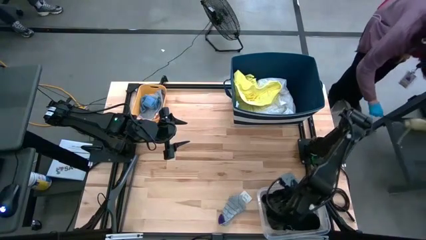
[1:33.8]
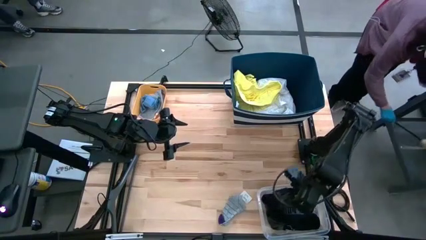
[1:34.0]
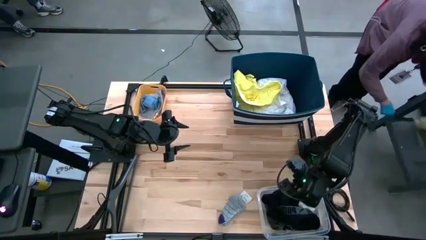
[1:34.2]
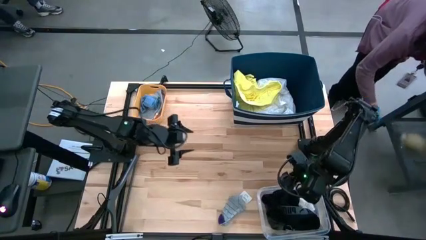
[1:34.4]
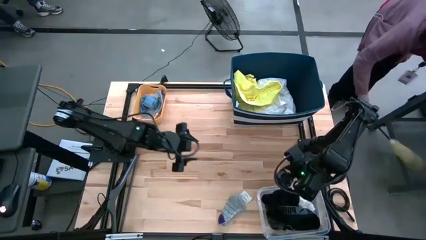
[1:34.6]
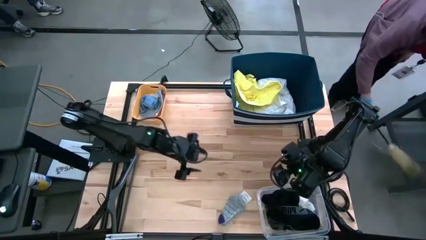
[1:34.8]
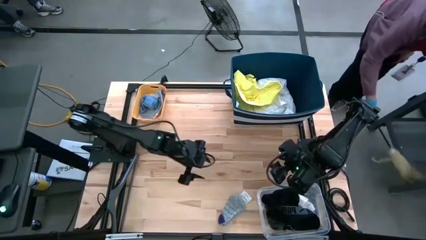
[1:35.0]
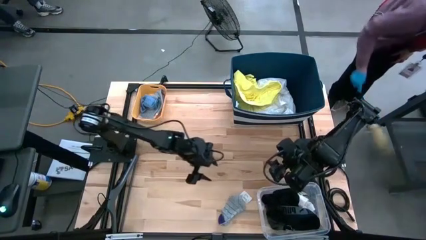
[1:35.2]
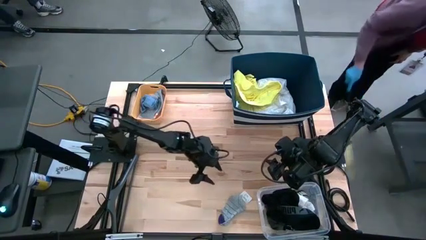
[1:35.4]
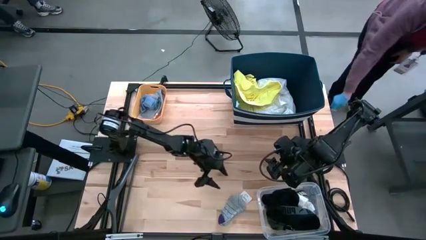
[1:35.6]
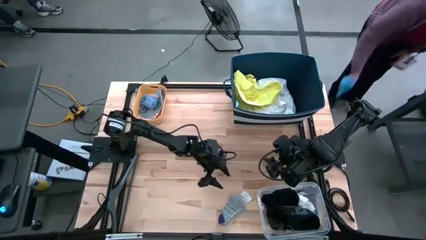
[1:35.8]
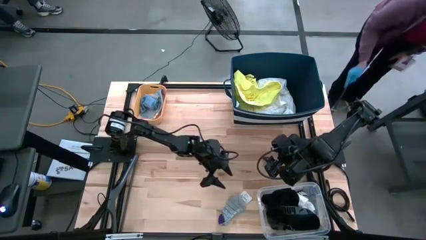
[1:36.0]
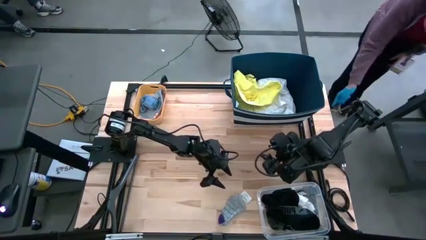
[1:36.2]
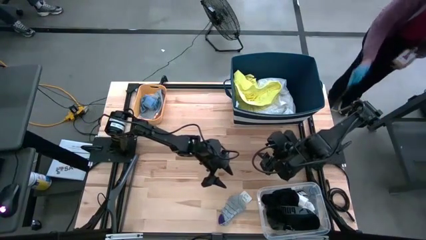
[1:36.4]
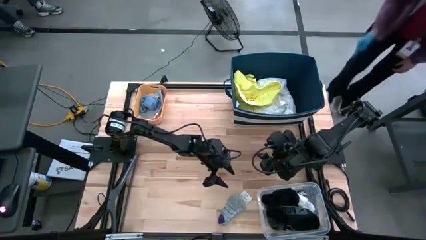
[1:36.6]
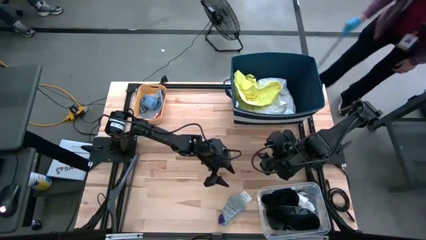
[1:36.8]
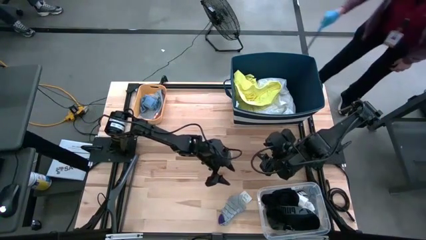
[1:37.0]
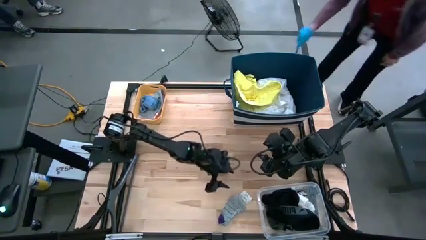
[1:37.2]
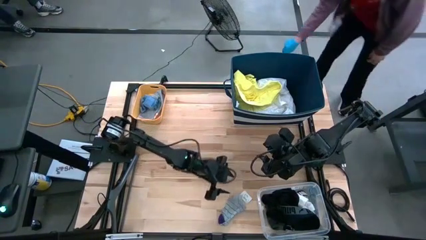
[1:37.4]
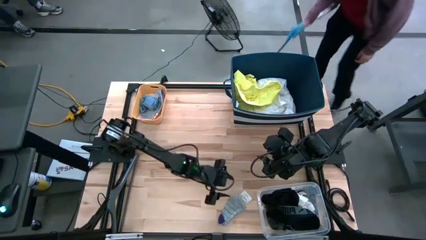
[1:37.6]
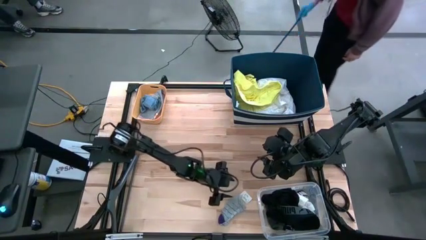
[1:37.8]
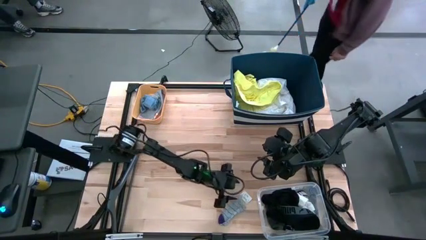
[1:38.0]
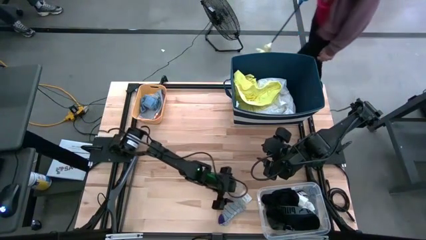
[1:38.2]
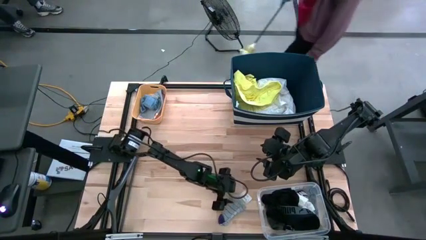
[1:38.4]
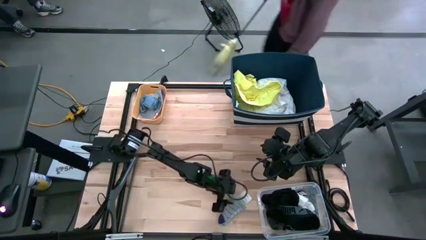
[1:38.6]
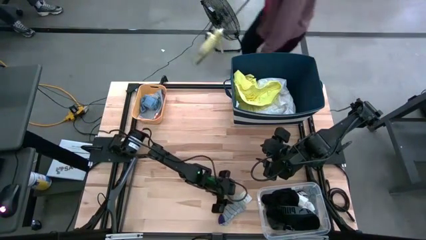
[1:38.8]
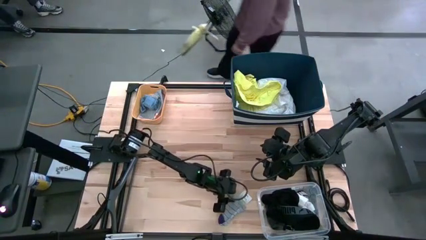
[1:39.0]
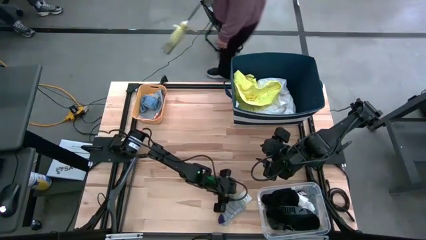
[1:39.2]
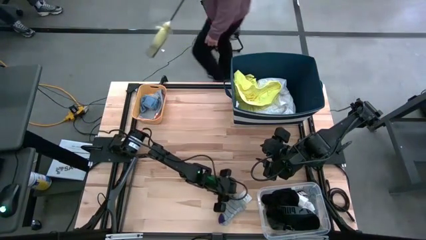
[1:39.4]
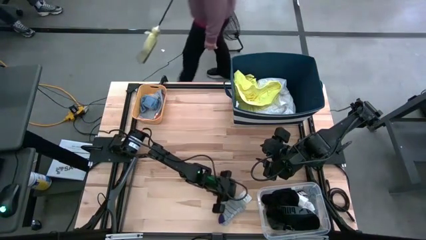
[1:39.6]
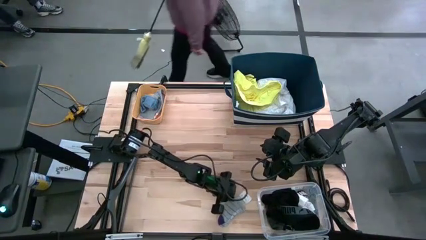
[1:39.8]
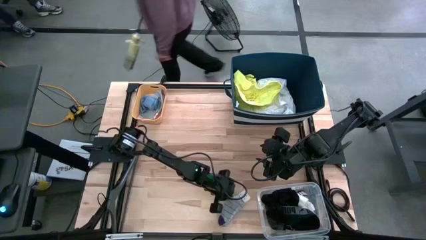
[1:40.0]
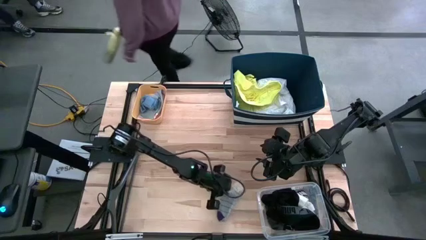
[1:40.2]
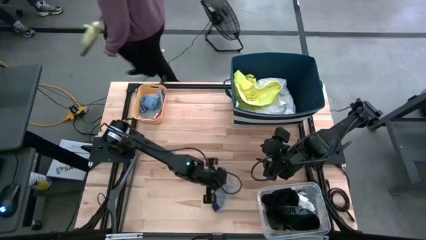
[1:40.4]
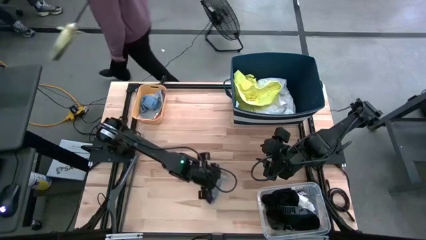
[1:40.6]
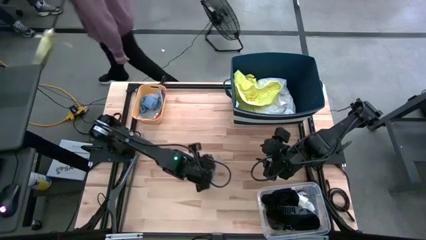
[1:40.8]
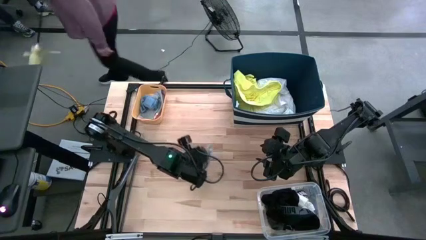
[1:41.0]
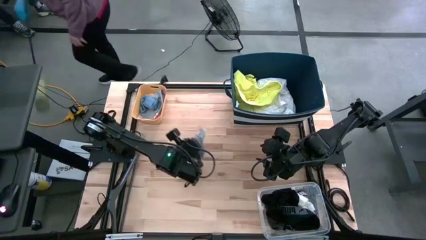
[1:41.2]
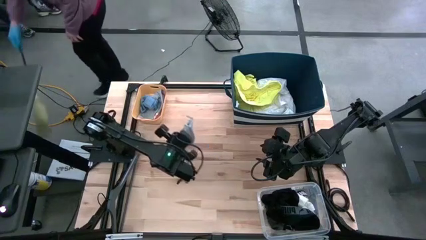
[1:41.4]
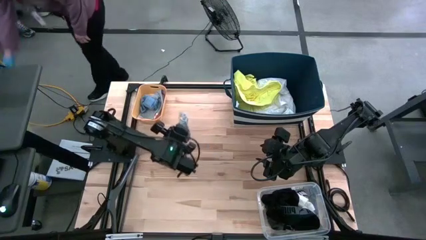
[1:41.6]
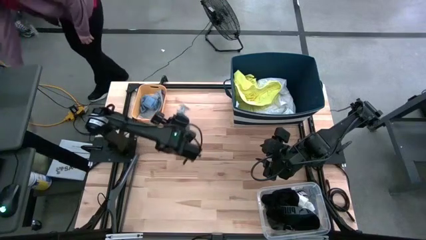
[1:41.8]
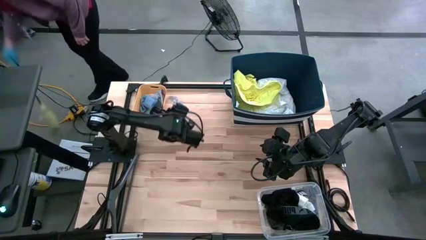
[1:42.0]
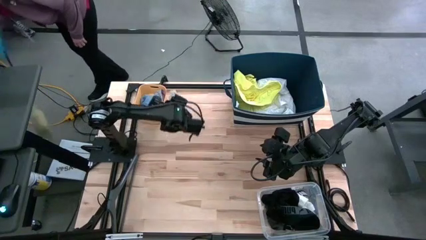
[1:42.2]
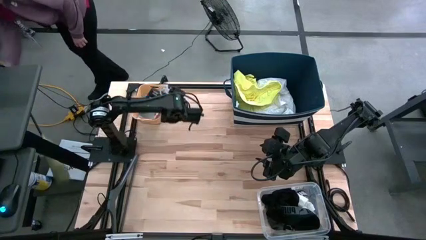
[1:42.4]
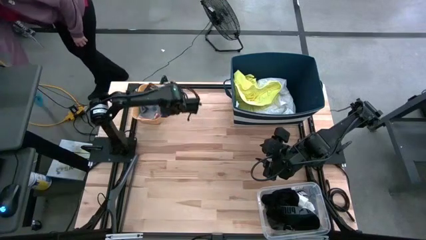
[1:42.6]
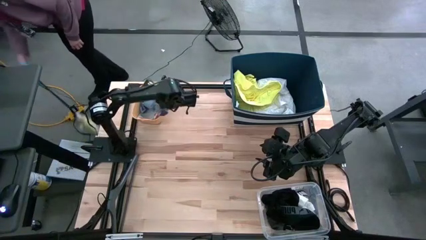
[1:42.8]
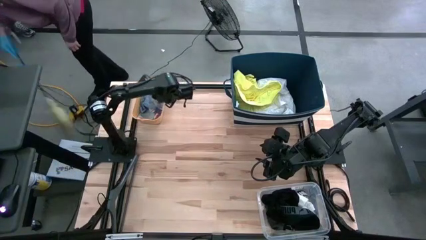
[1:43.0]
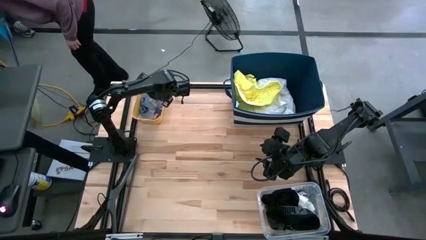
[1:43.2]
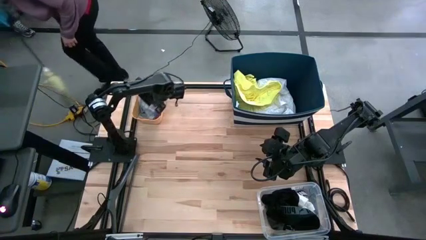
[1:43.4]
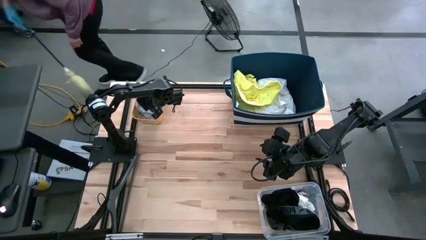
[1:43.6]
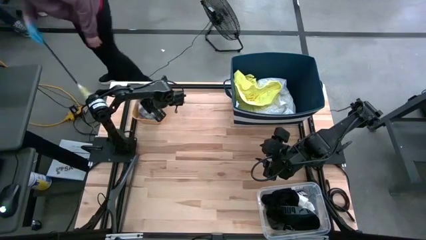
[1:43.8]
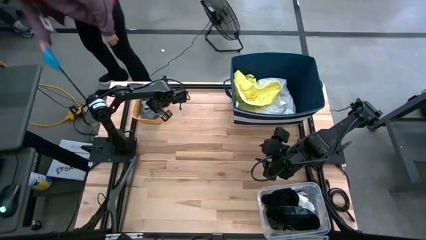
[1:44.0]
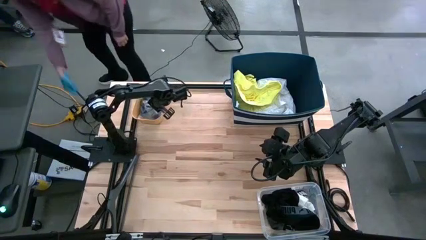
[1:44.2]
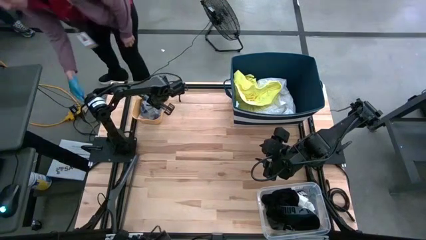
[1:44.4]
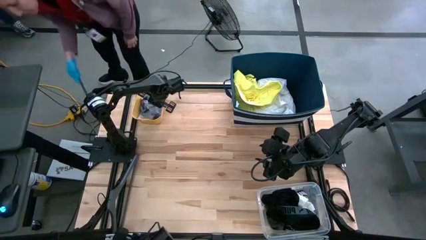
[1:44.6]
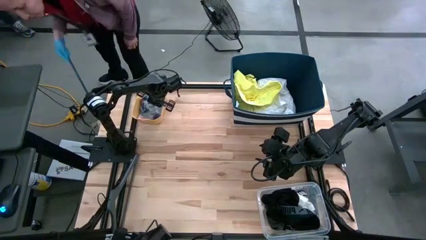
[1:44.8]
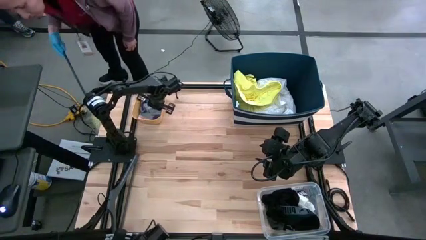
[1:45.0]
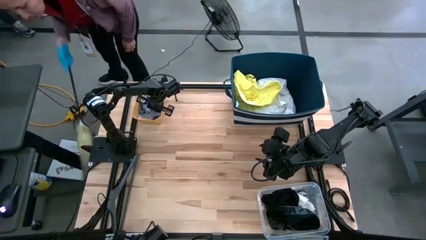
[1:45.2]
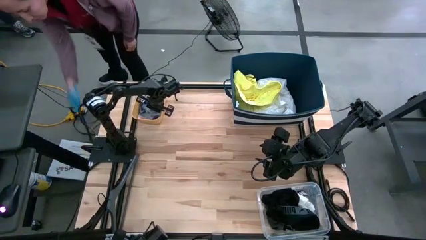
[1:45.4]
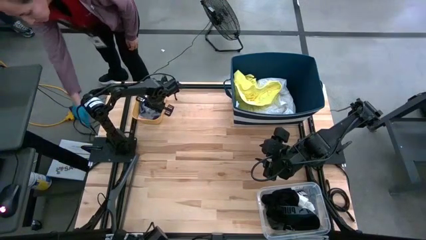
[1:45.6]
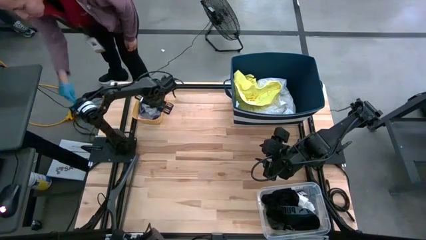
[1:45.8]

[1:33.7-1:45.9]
Task: Pick & Place Cloths
Put the gray and purple sock into the yellow bin

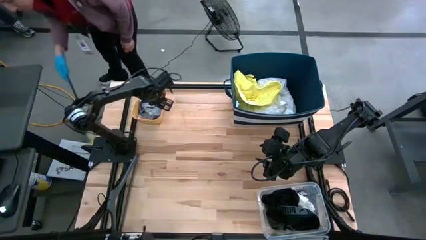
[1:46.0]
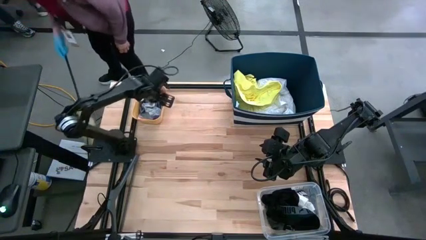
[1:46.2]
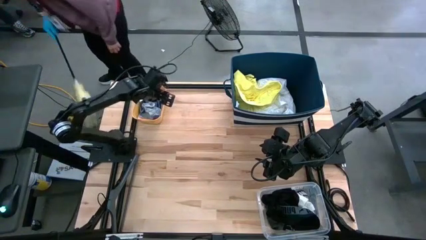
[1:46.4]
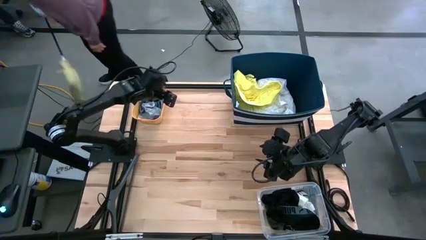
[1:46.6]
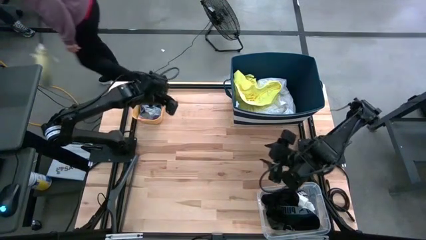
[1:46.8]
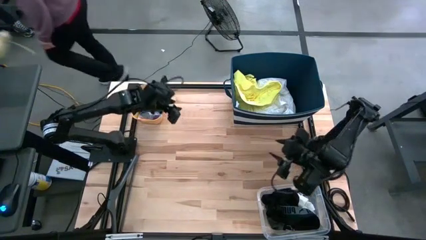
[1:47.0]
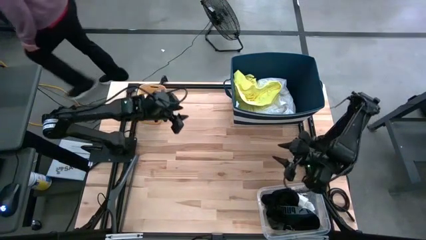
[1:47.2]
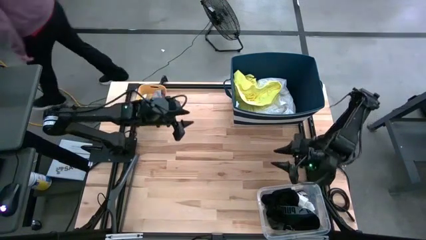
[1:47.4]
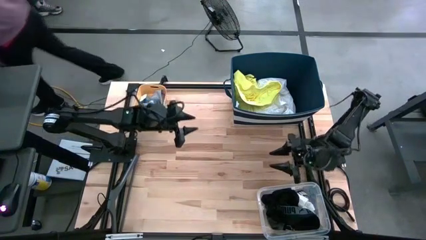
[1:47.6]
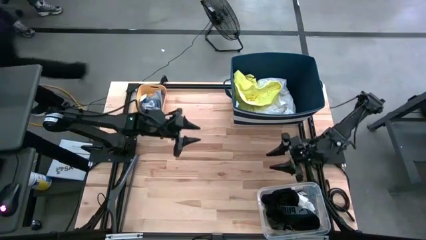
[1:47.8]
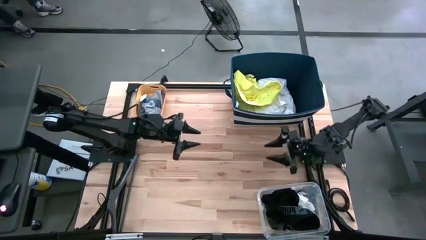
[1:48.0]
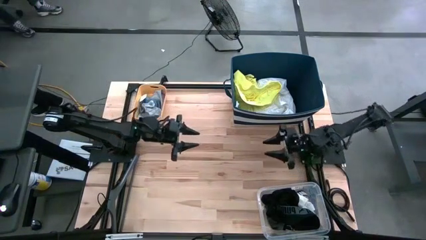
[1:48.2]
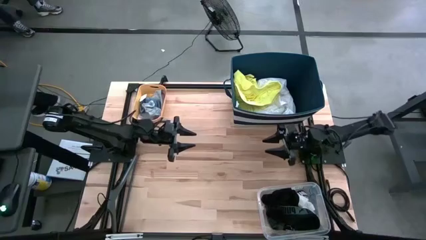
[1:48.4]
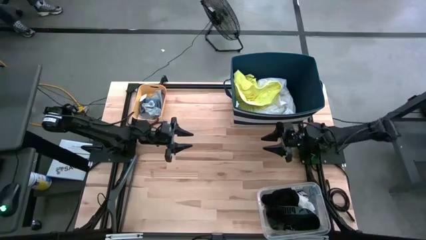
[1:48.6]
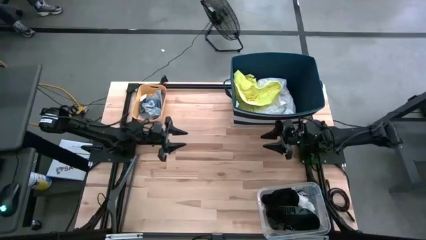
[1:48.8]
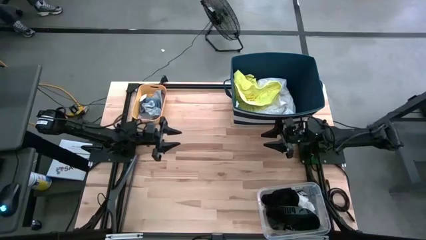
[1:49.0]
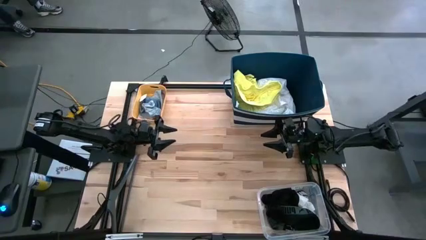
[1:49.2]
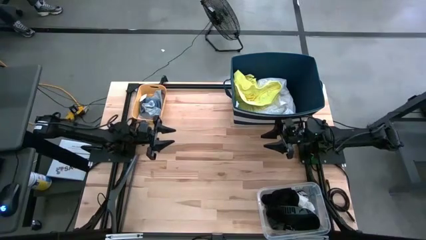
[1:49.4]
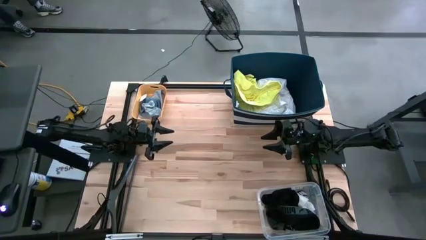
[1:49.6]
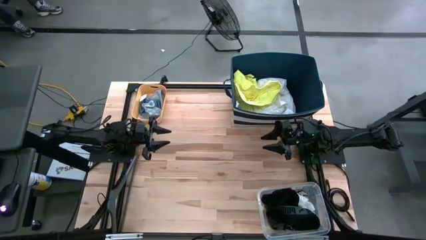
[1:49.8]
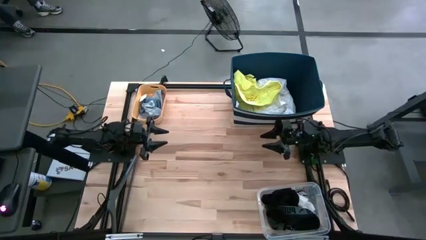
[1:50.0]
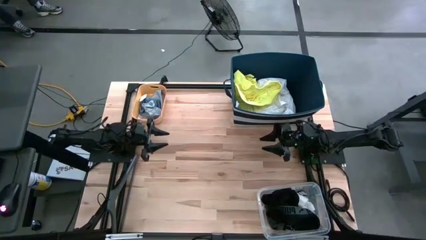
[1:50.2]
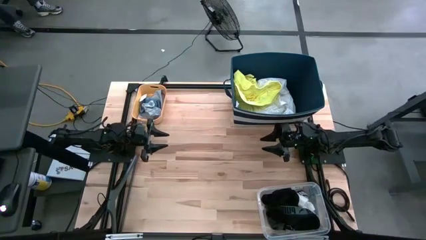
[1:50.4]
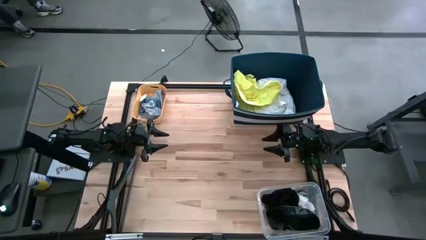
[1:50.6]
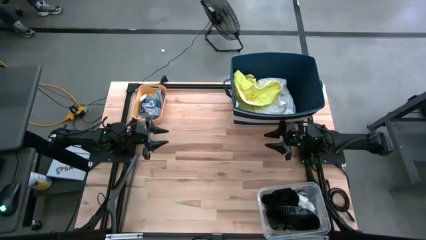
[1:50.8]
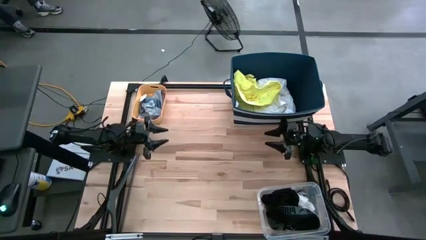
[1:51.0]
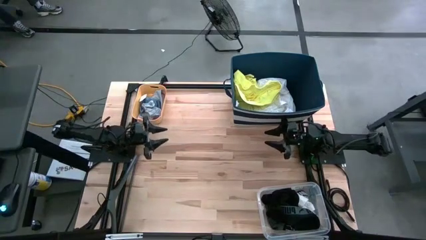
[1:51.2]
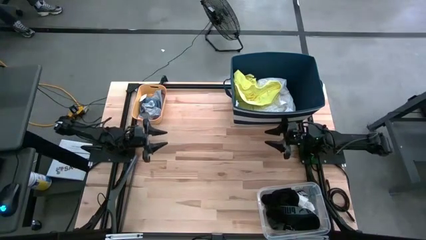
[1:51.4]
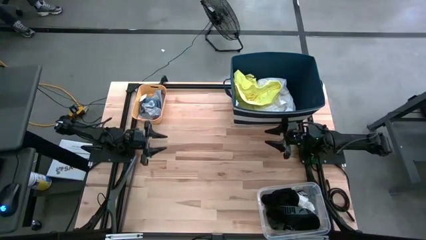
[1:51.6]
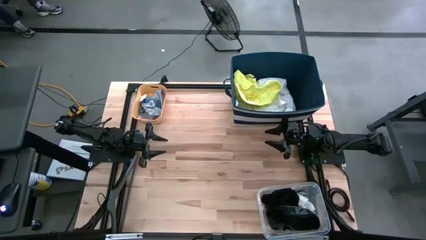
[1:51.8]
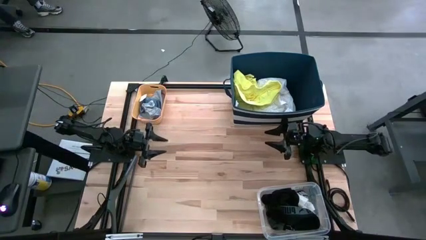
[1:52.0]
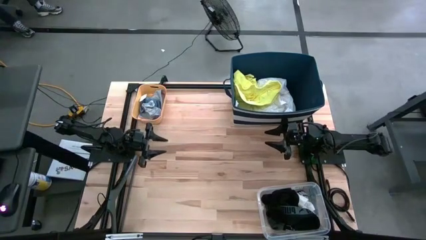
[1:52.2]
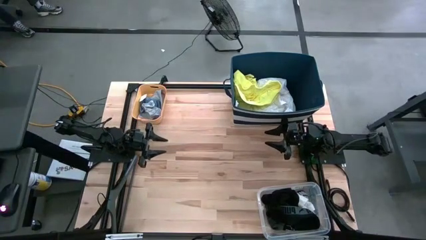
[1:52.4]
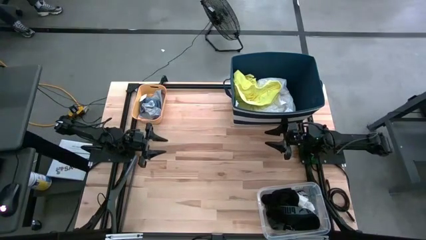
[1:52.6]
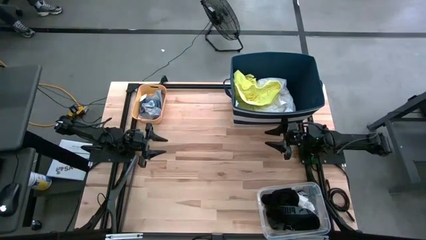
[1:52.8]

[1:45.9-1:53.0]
Return to Home Position
